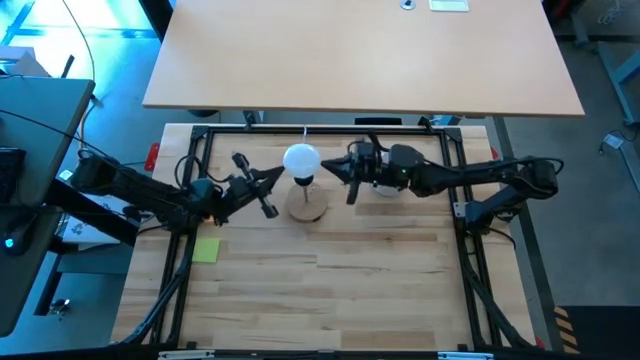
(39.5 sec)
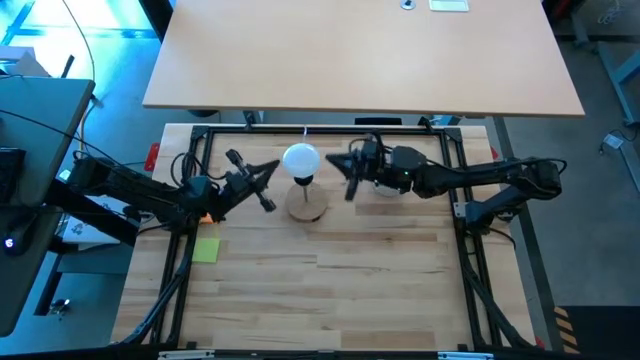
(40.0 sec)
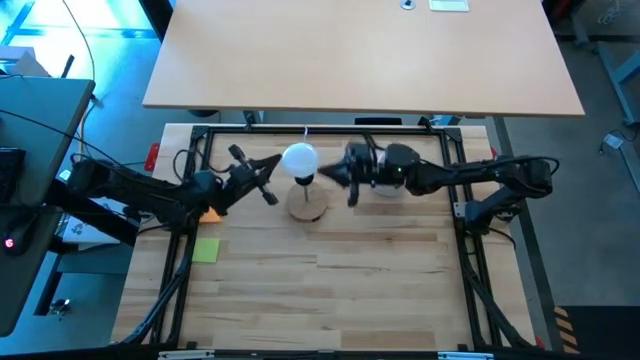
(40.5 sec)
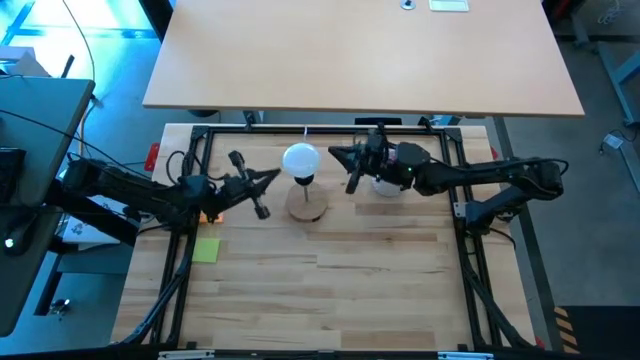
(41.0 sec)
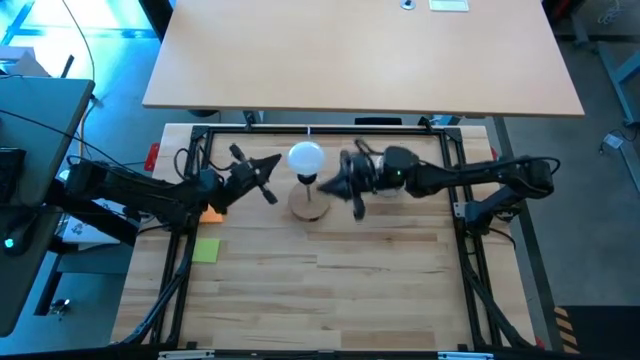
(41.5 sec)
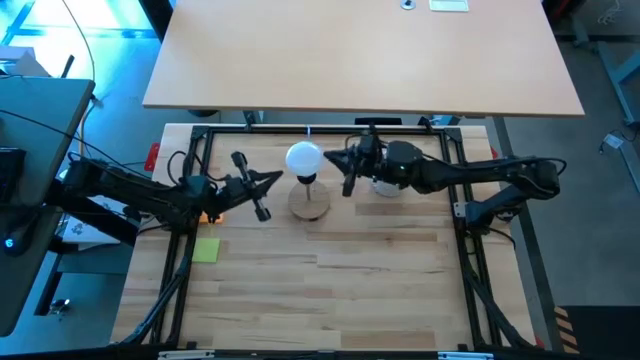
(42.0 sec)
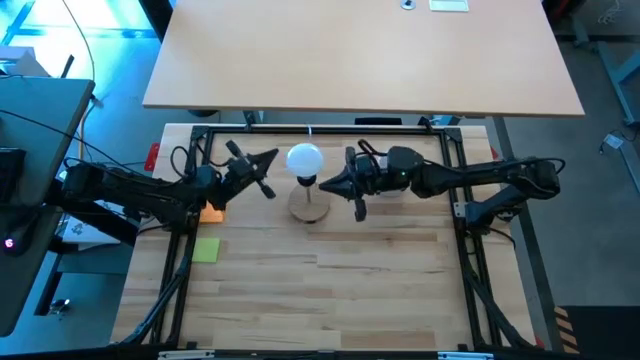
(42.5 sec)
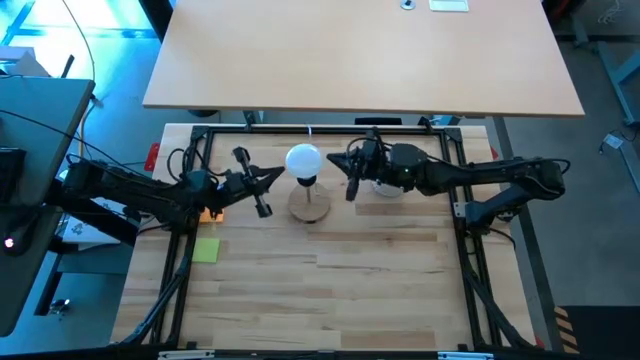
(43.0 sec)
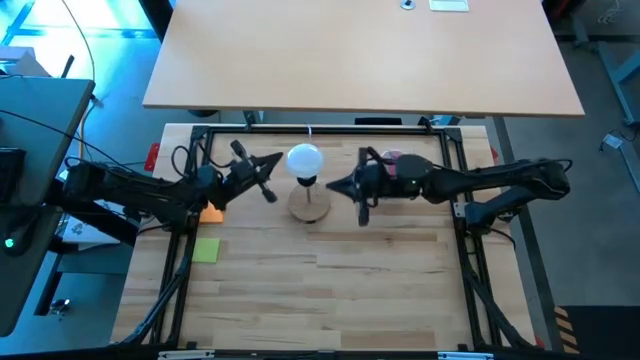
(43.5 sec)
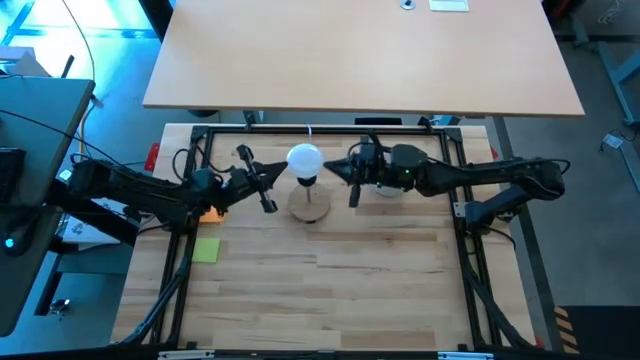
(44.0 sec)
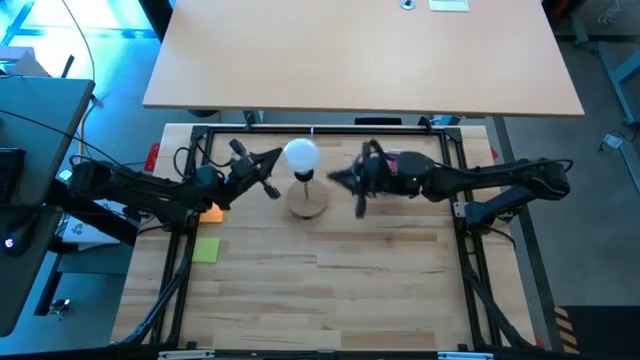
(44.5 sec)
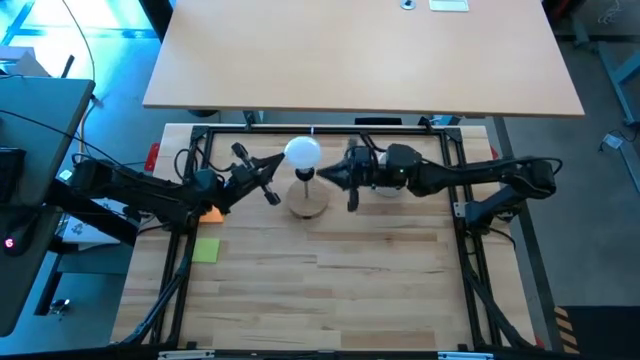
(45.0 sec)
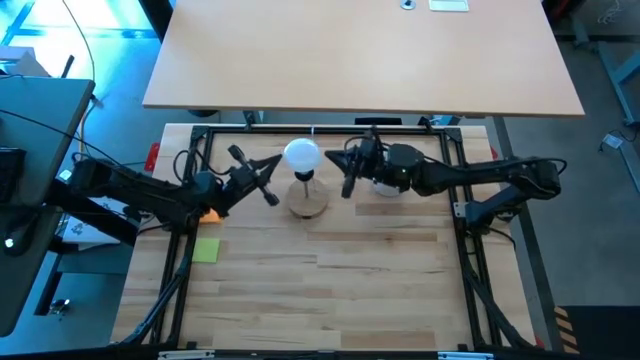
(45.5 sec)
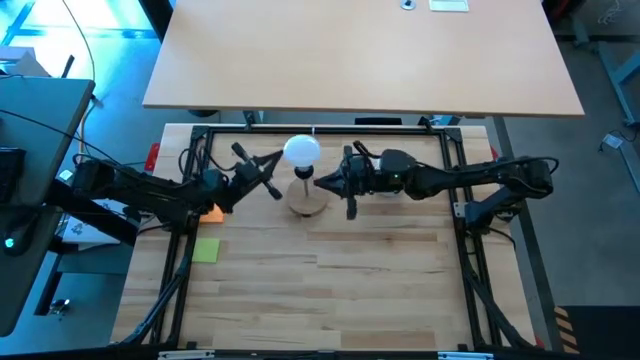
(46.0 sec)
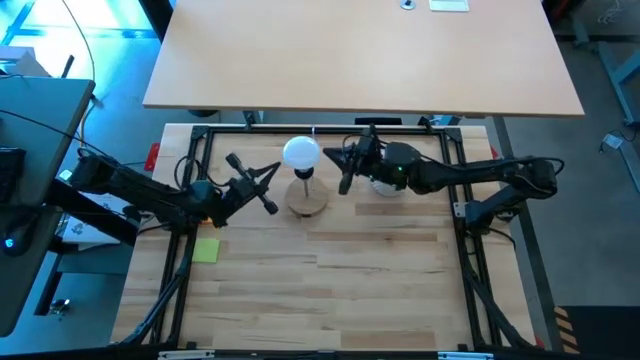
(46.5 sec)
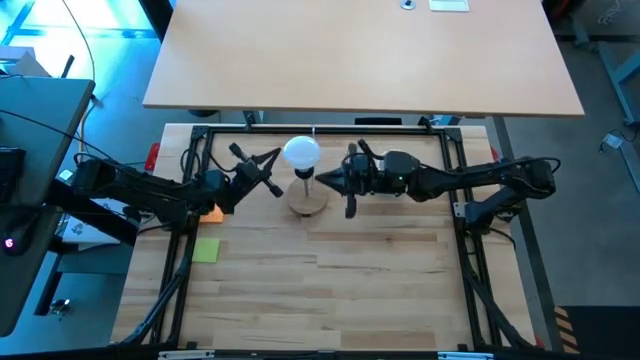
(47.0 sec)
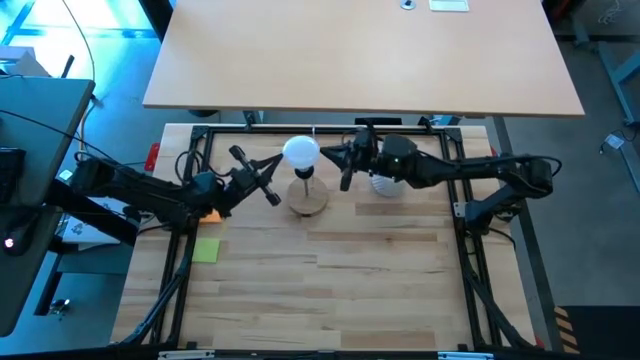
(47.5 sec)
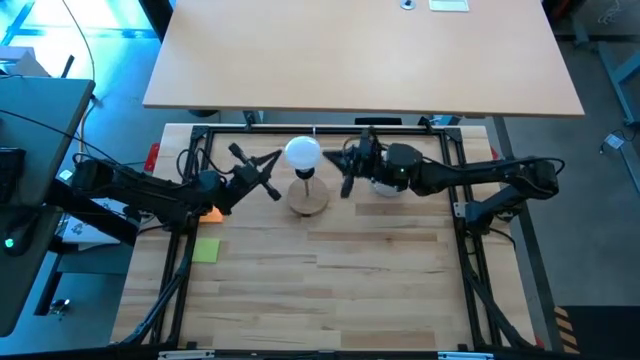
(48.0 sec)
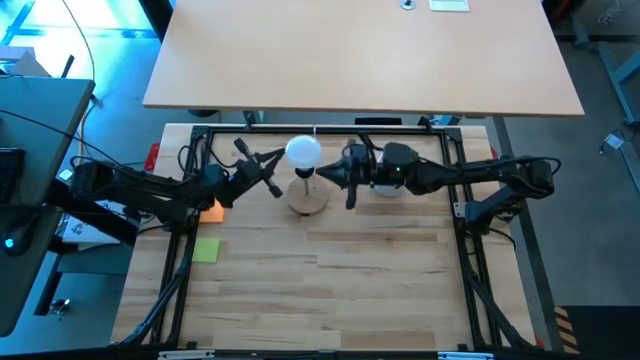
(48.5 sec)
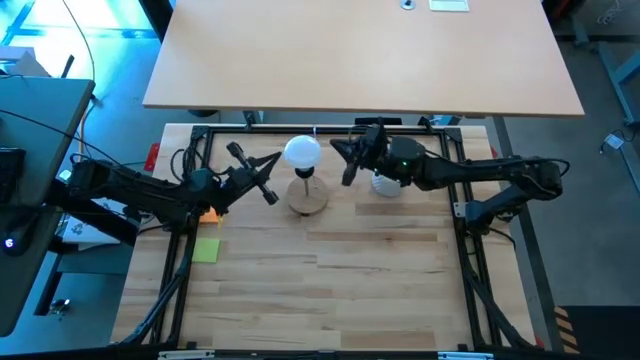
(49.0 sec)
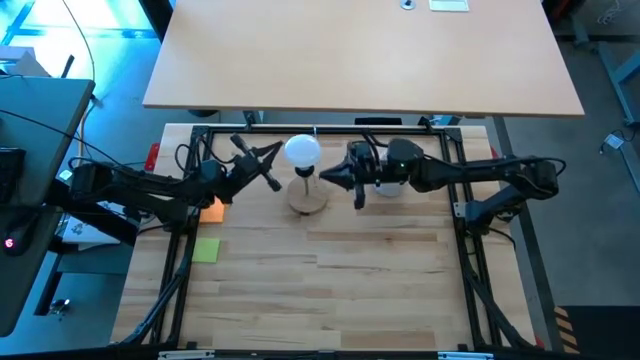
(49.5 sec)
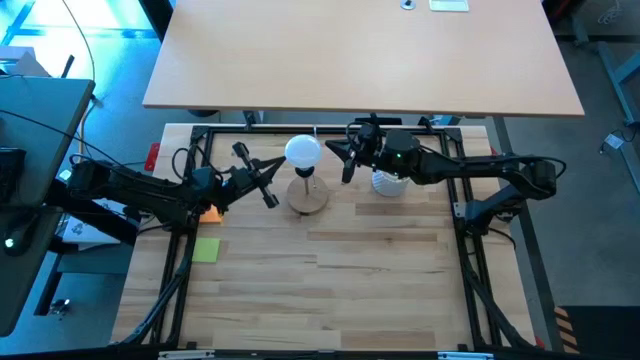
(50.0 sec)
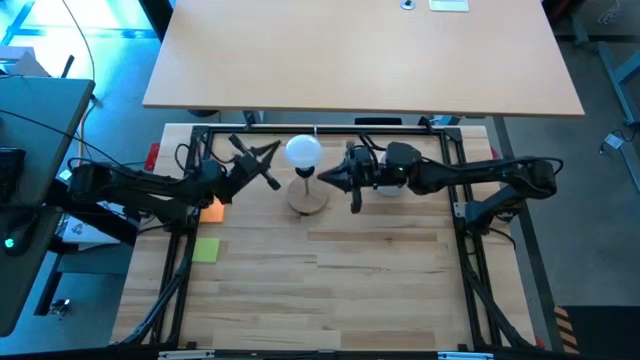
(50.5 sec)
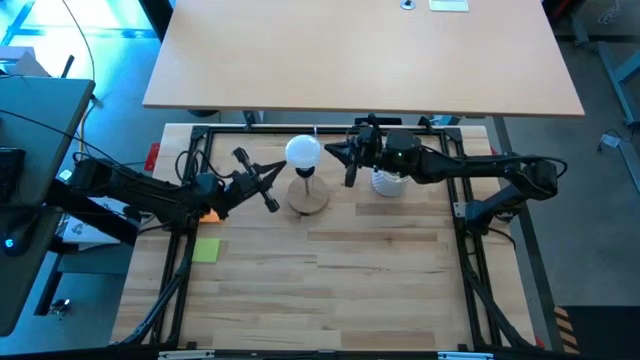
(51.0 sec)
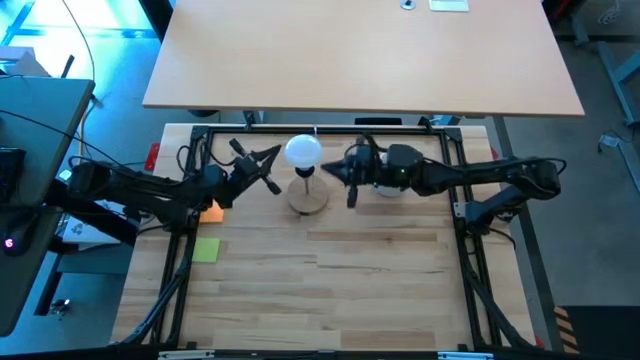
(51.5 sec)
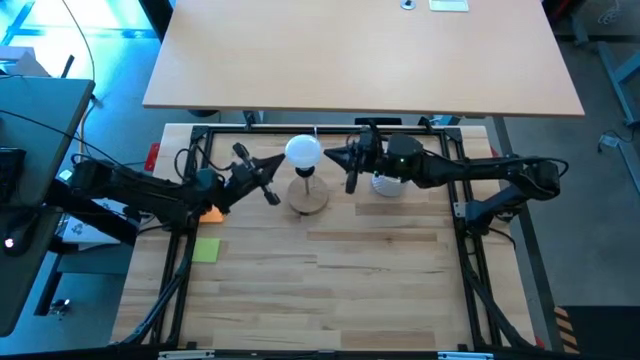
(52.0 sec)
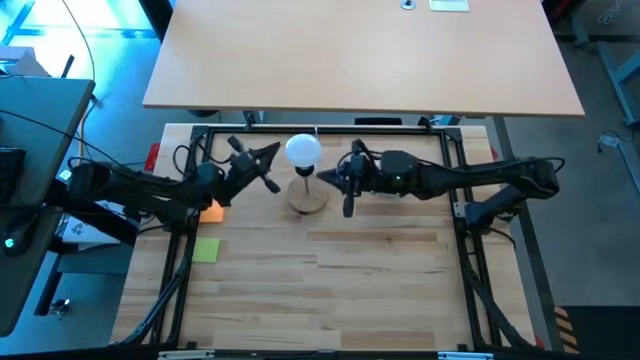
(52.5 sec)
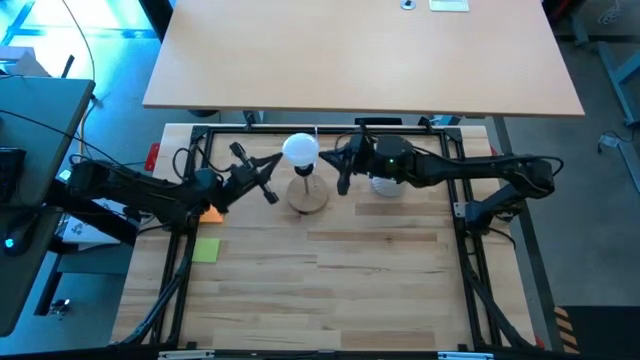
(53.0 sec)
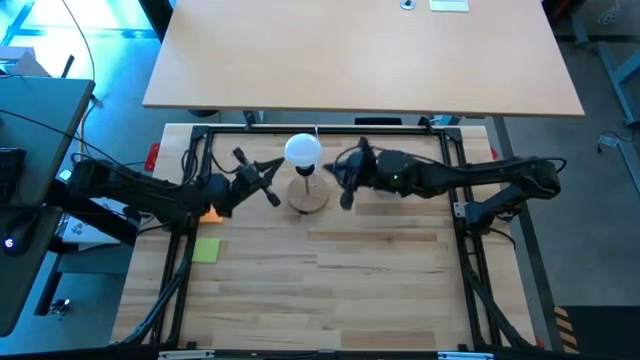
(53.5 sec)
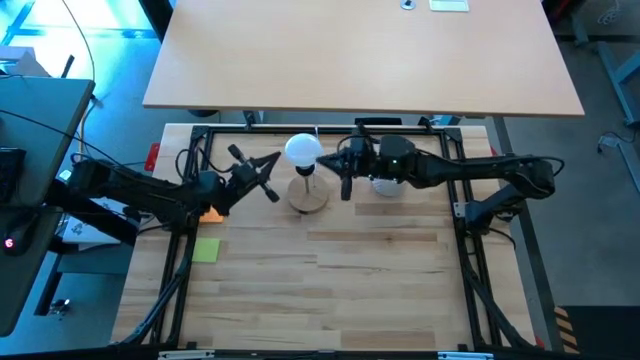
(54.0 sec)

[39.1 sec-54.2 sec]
Task: Screw lightbulb
Insert the lightbulb into the lamp
